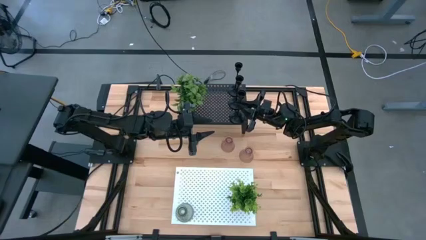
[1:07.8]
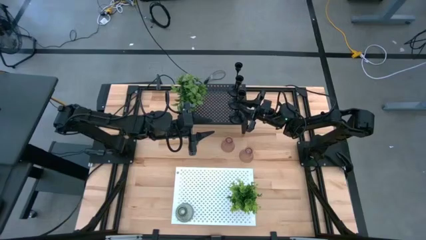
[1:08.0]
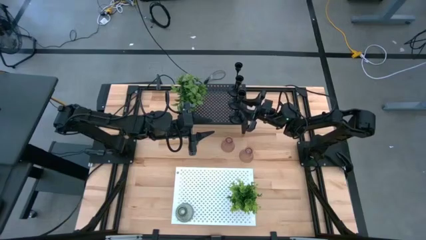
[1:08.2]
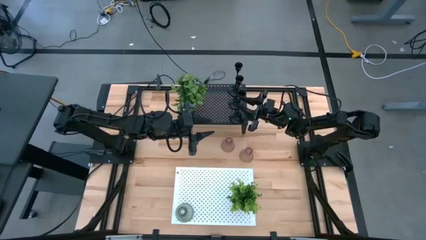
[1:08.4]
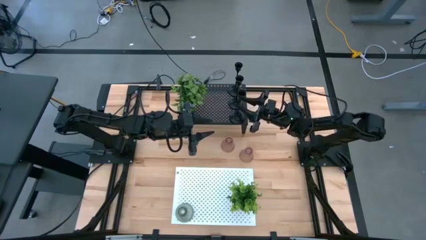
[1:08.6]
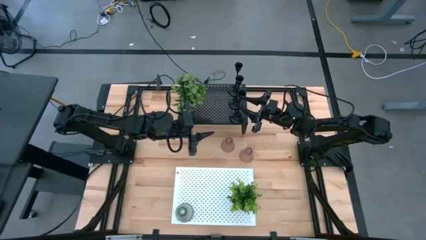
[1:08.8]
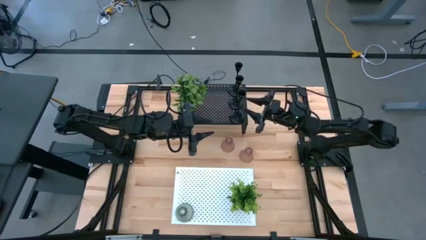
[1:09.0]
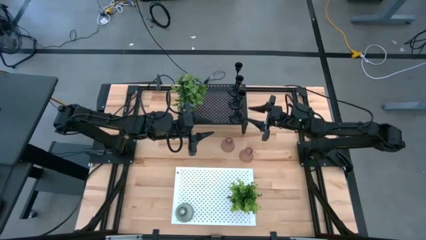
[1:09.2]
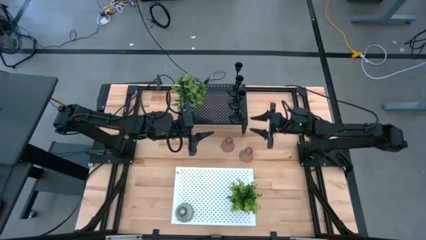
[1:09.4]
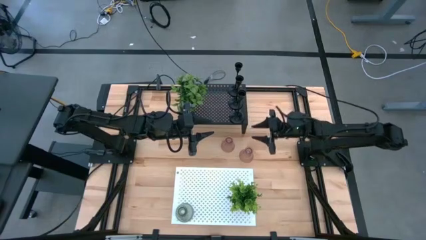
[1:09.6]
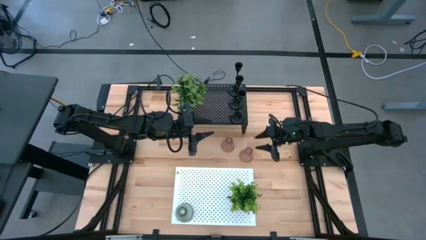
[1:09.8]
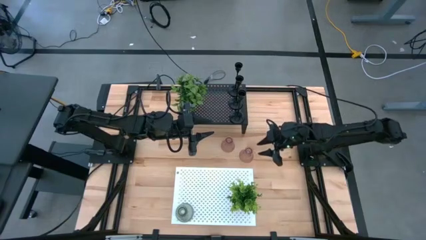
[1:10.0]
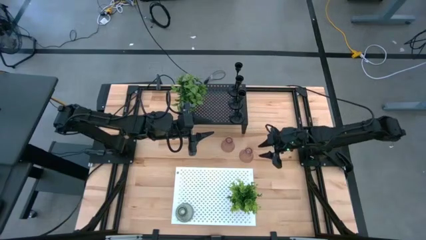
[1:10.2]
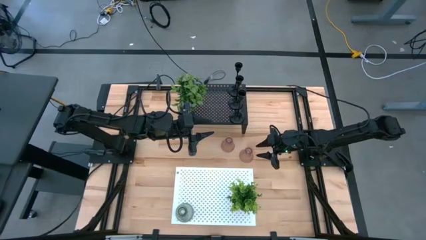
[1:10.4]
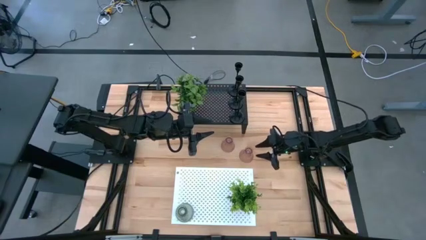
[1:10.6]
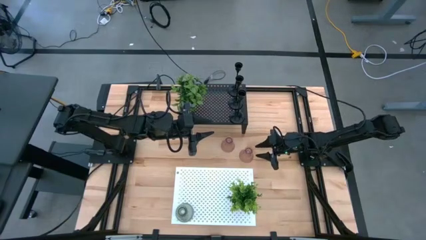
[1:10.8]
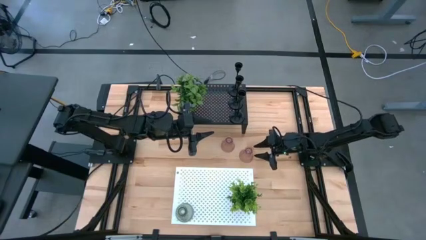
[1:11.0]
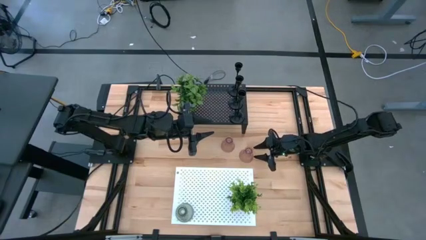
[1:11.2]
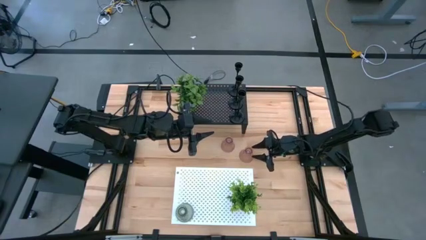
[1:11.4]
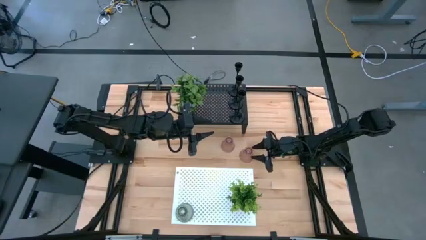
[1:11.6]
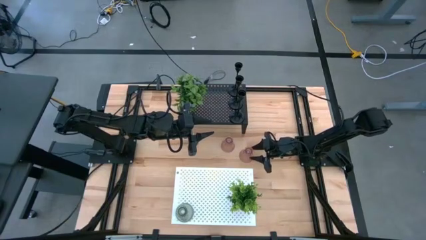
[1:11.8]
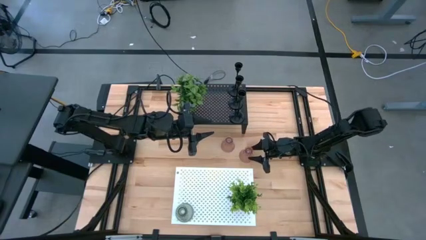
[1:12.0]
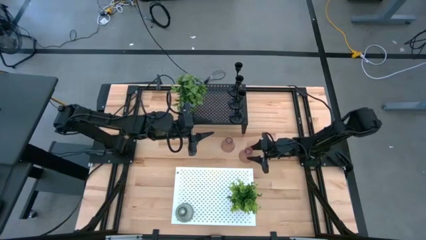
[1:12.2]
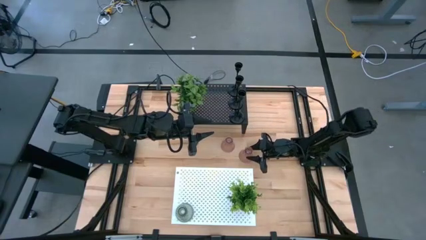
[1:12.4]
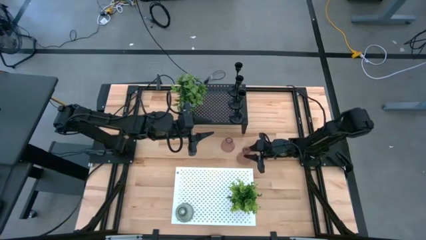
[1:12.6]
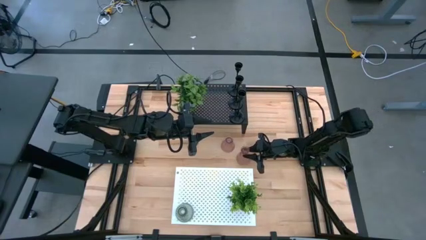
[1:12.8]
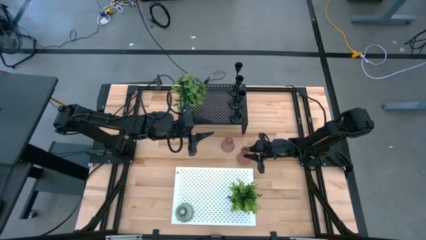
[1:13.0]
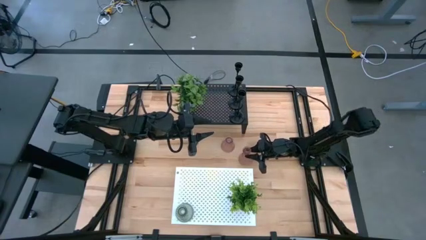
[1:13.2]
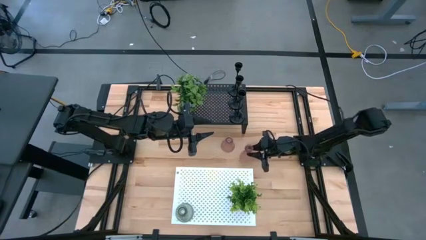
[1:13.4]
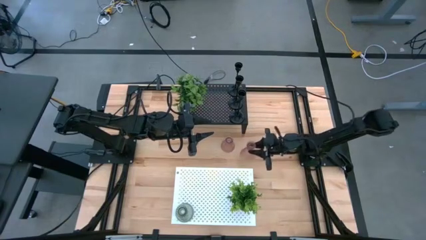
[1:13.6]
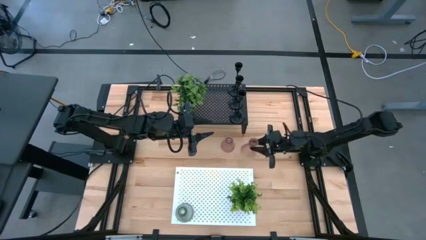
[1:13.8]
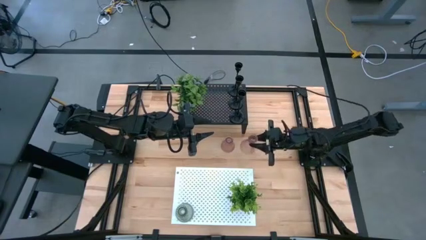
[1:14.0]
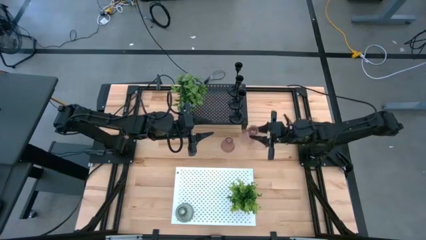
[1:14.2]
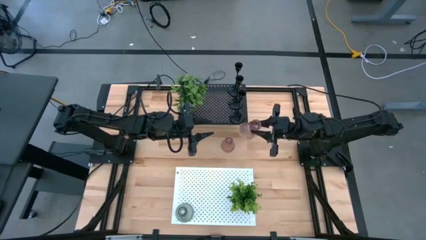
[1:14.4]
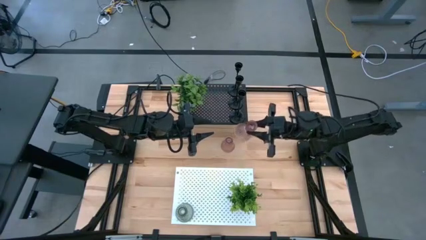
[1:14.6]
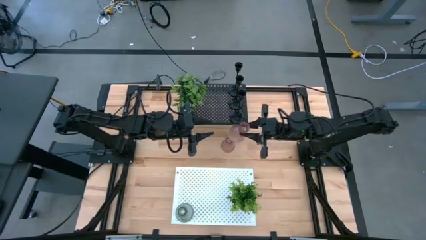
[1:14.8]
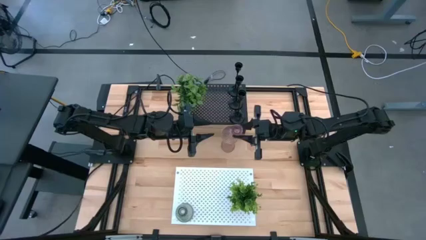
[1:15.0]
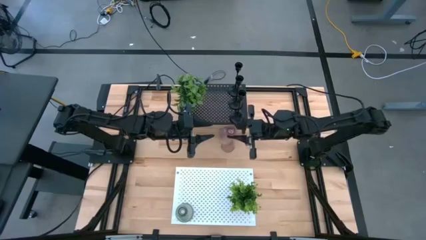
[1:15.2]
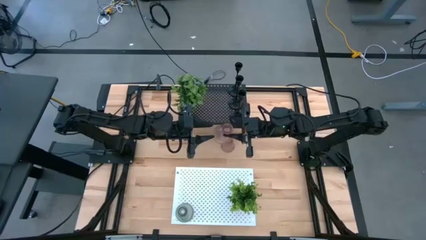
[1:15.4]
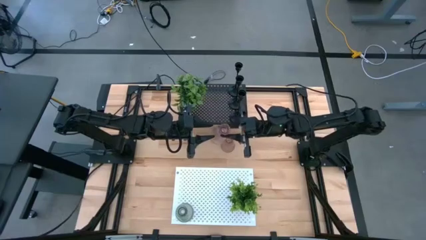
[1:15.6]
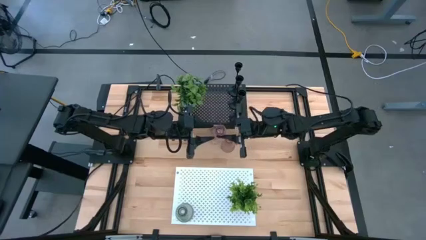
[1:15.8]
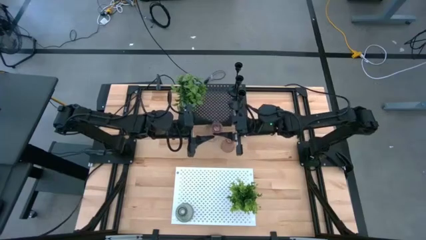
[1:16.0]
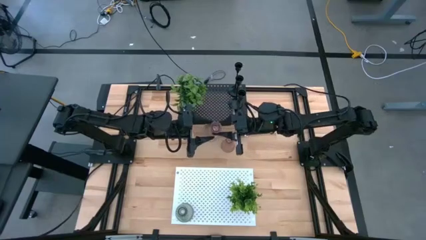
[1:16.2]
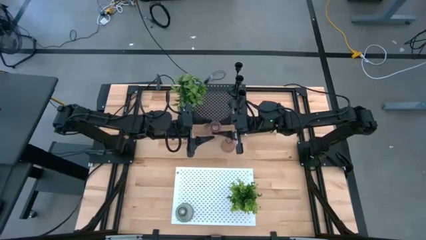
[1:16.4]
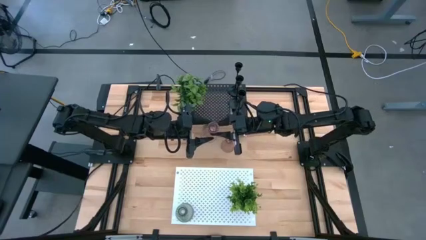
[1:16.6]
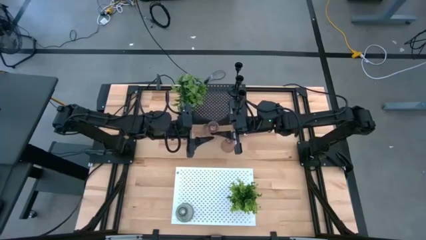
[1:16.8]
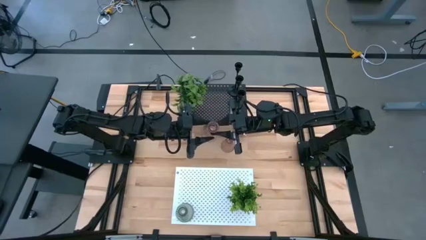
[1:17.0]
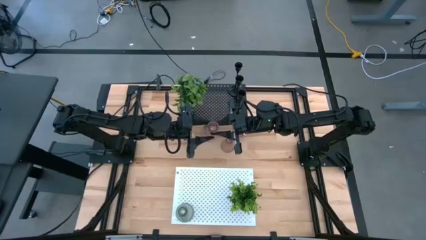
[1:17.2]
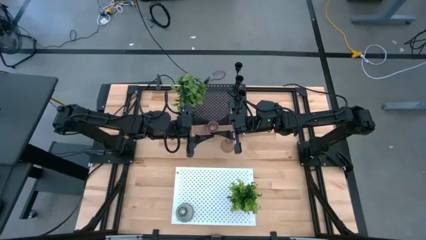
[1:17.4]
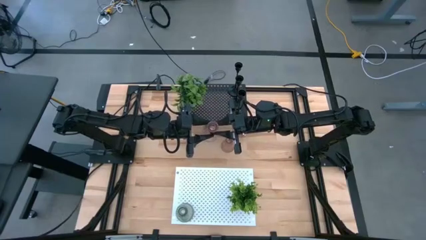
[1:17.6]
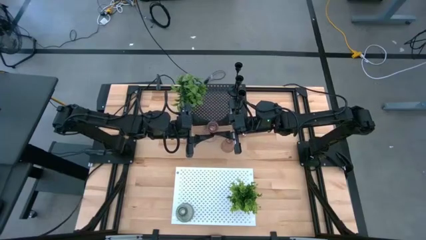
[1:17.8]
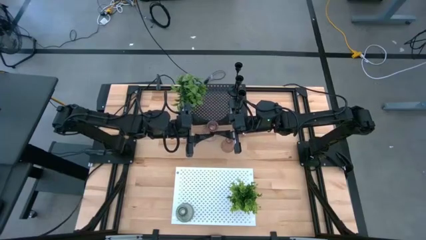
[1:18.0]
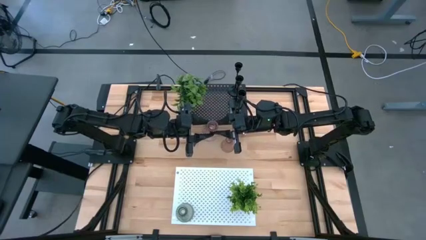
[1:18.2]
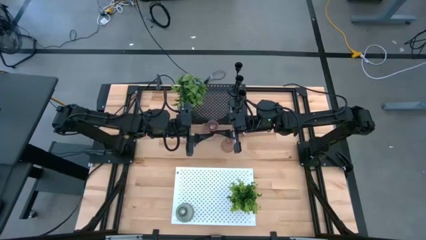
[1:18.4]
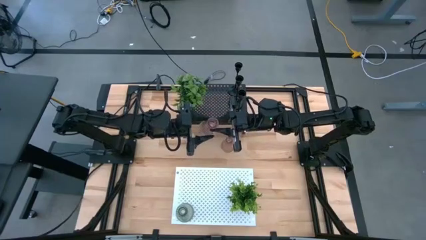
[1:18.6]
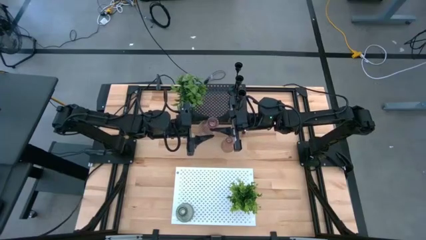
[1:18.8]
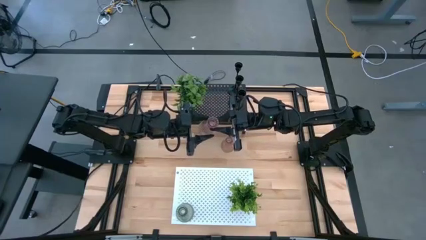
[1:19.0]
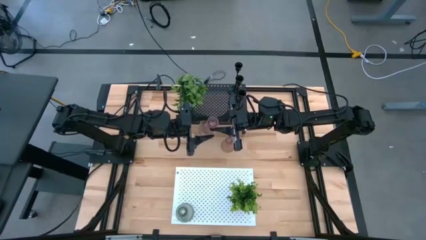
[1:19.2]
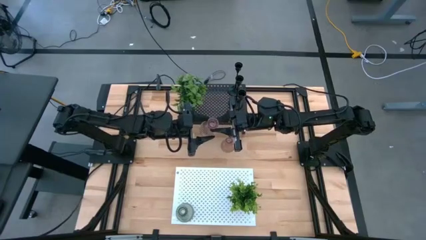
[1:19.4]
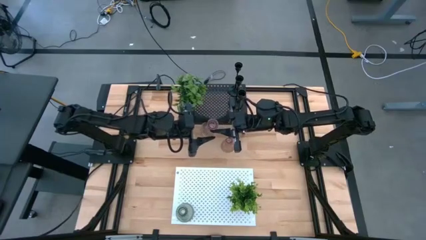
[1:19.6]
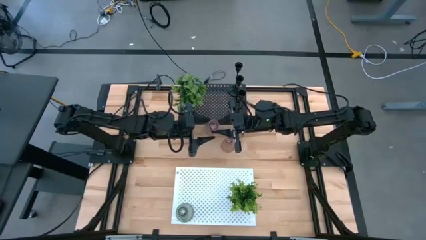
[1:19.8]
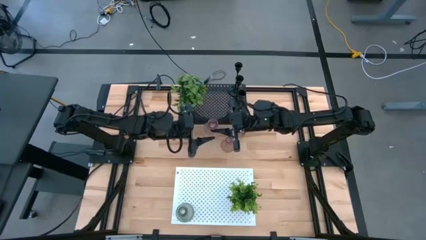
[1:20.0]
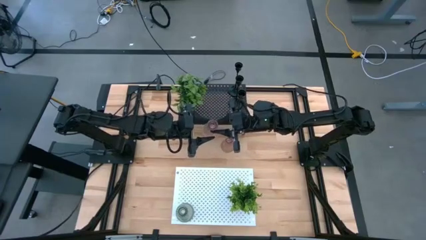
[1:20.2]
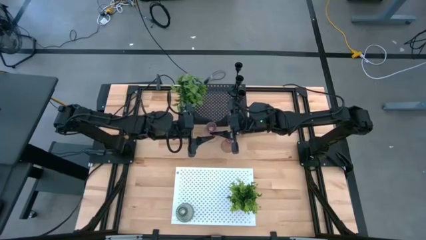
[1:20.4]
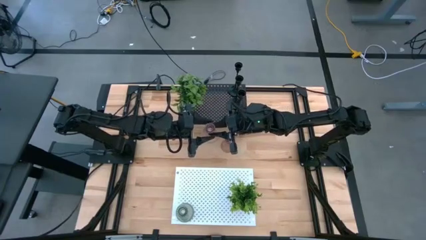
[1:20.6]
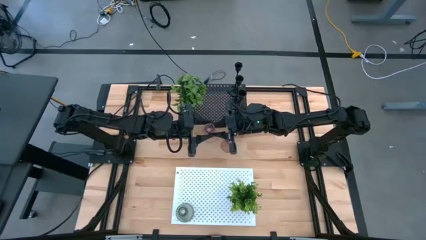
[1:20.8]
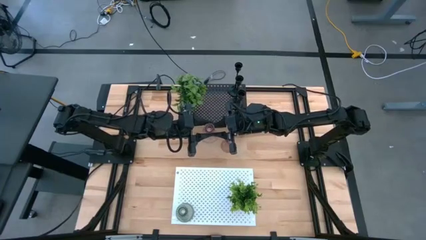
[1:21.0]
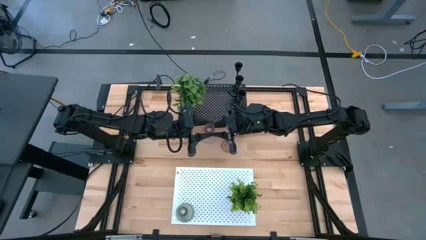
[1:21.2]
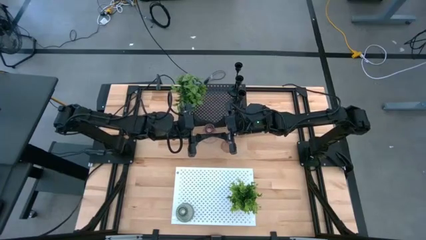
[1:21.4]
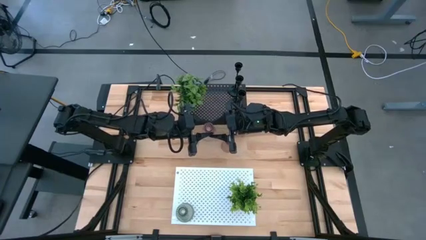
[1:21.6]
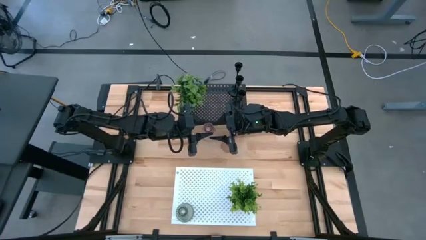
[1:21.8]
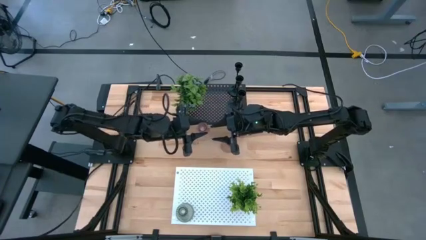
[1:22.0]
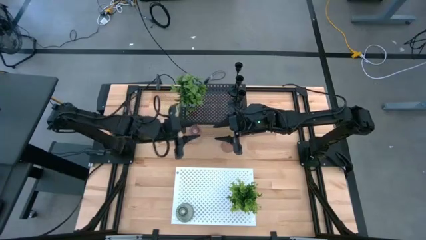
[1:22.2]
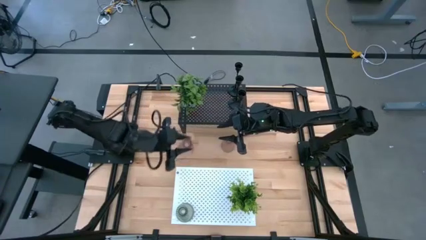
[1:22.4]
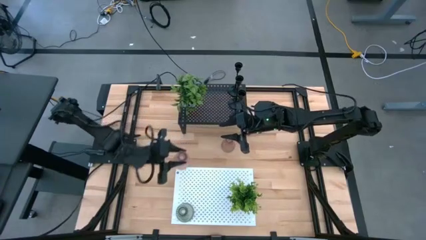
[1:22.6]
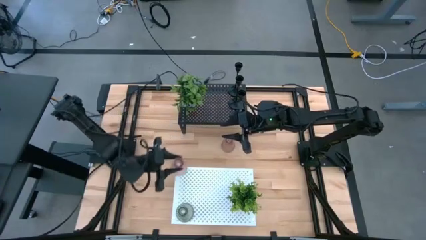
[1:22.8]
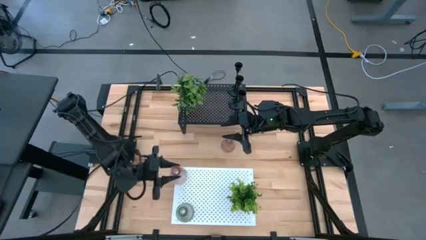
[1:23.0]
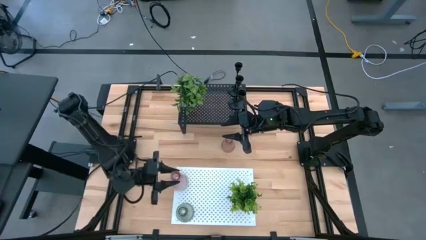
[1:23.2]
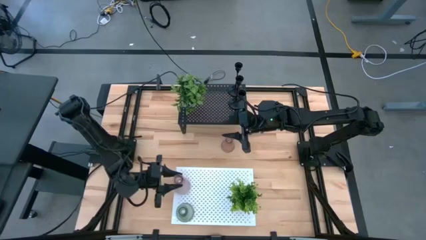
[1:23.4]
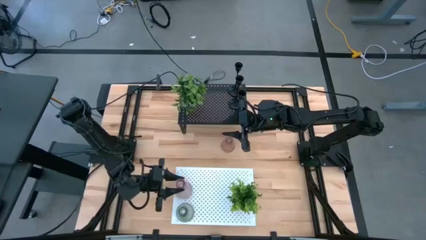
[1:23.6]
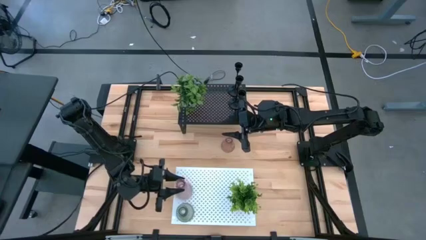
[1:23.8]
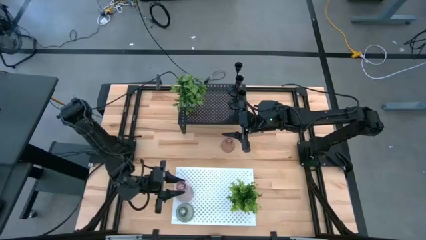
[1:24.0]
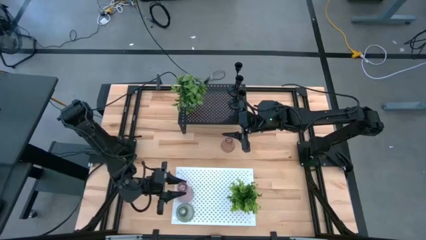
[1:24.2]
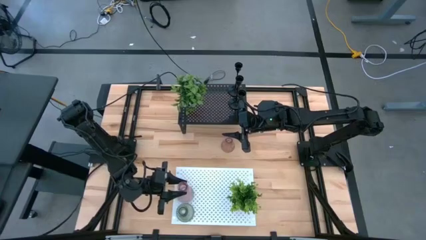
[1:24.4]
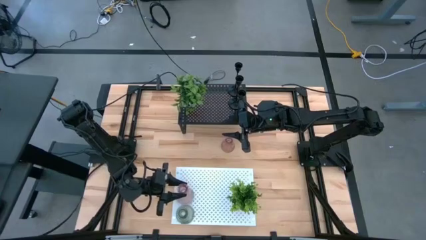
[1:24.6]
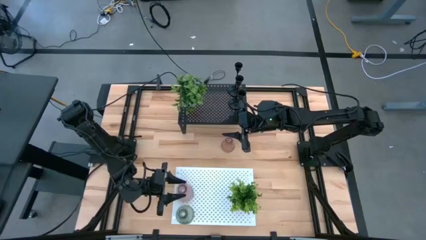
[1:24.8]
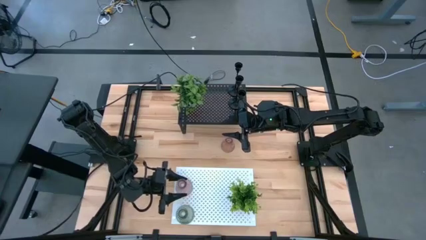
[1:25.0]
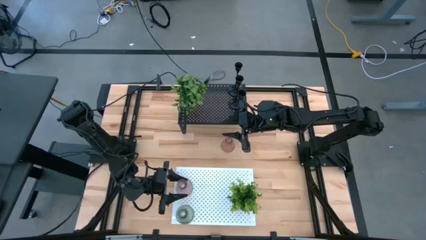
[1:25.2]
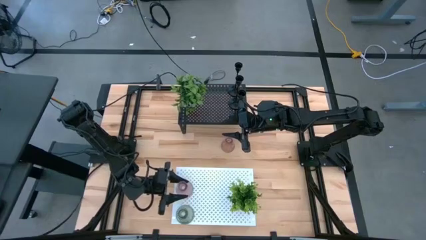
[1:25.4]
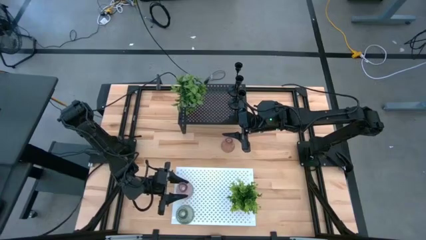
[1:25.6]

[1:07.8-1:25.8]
Task: Pick & Place candle stick holders
Put the small pink glass candle holder on the white shelf aligned with the other small green glass candle holder
